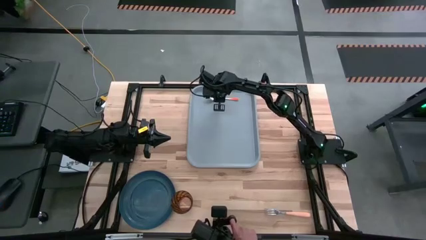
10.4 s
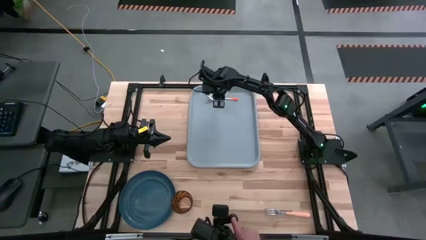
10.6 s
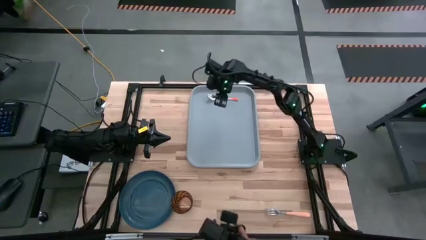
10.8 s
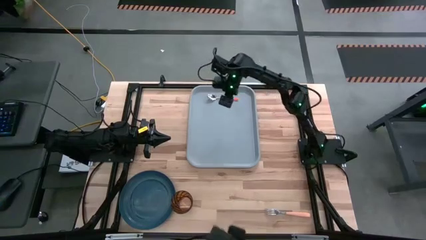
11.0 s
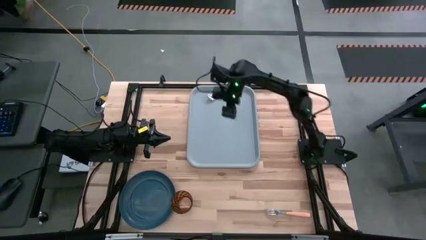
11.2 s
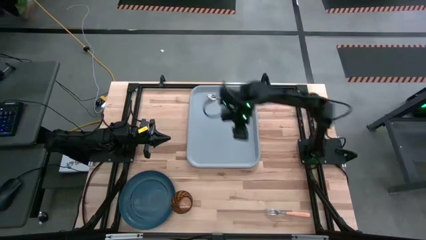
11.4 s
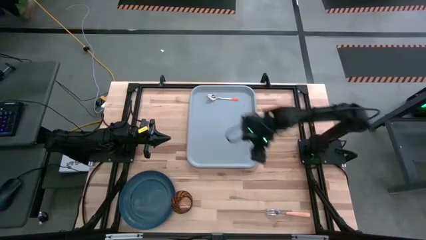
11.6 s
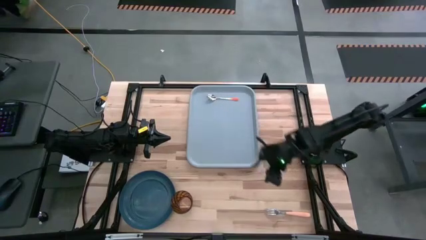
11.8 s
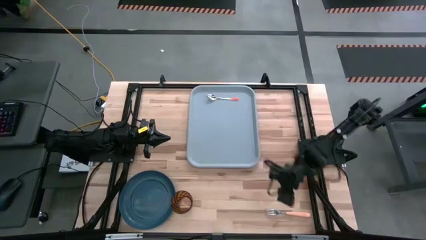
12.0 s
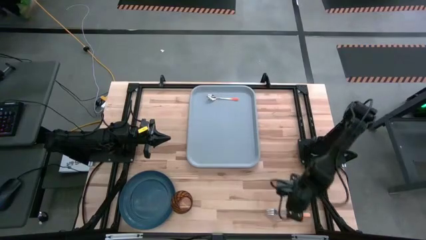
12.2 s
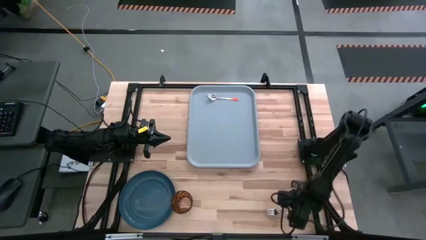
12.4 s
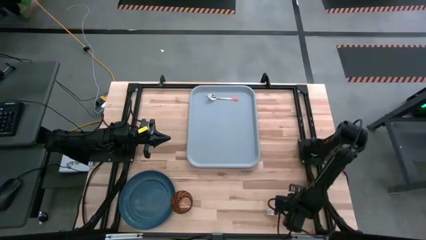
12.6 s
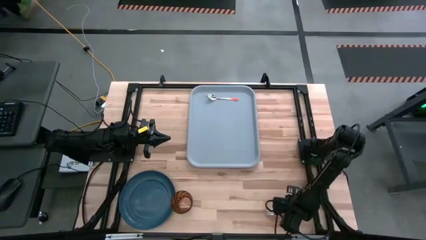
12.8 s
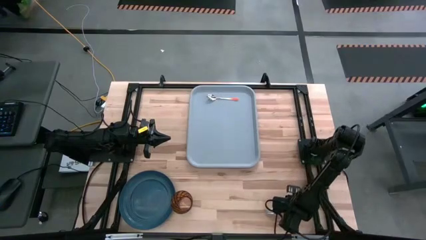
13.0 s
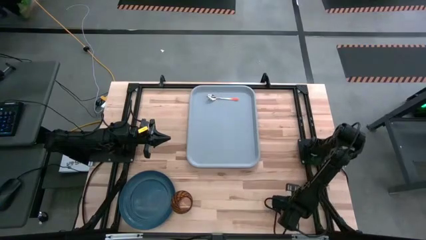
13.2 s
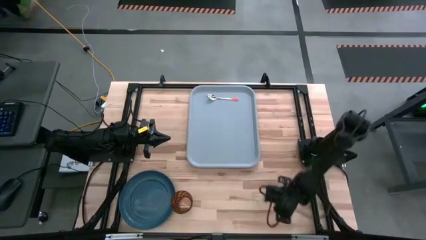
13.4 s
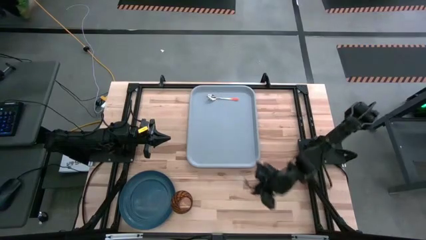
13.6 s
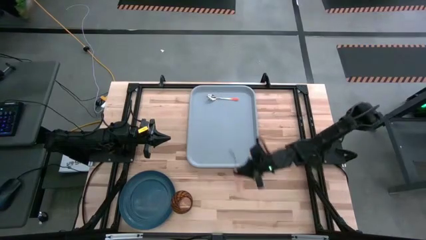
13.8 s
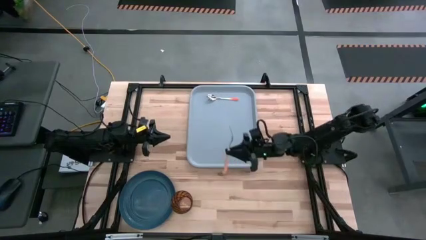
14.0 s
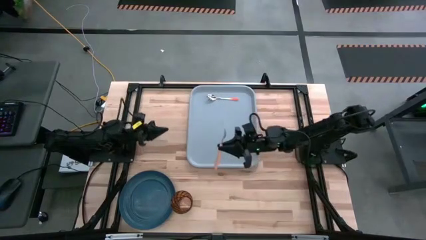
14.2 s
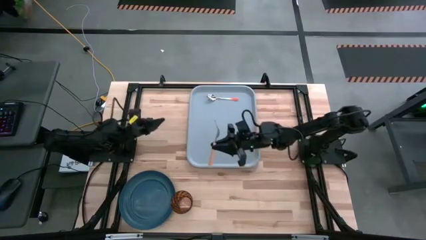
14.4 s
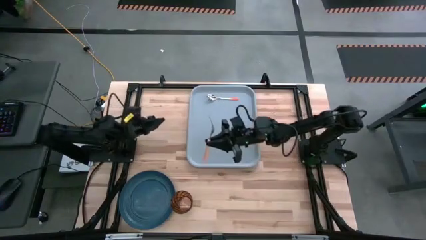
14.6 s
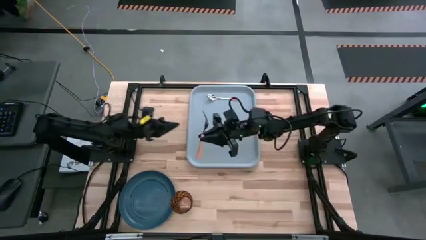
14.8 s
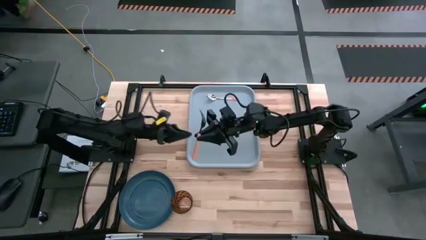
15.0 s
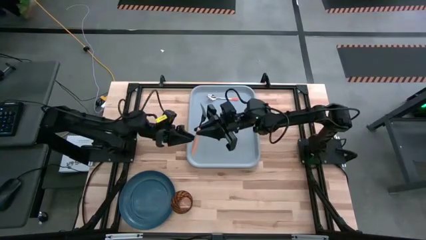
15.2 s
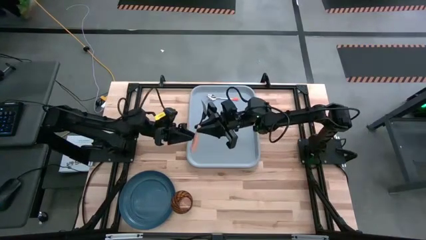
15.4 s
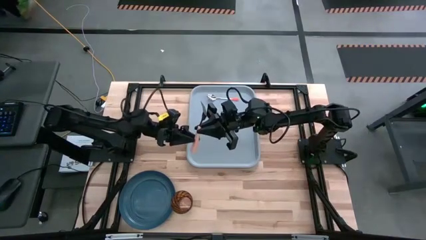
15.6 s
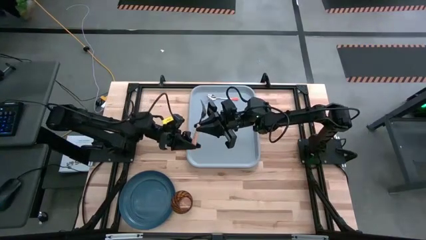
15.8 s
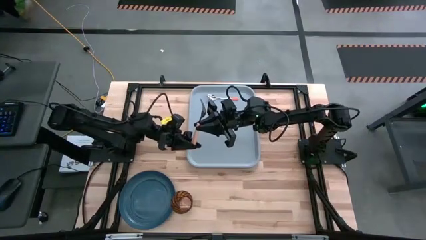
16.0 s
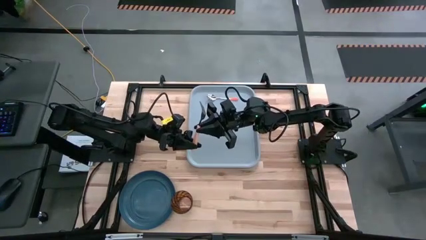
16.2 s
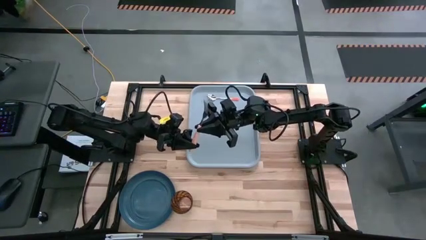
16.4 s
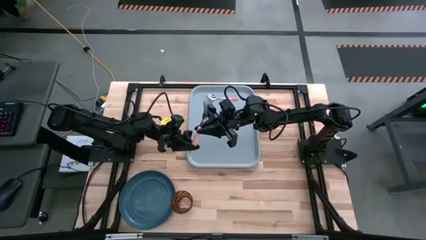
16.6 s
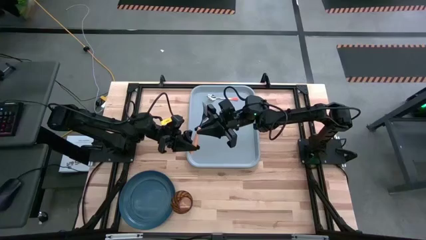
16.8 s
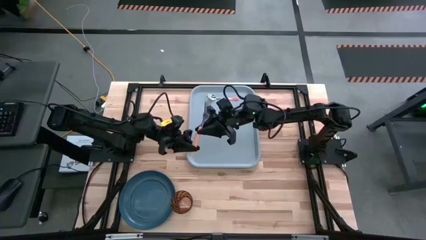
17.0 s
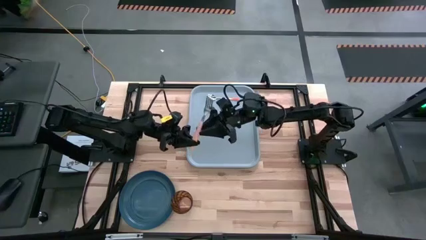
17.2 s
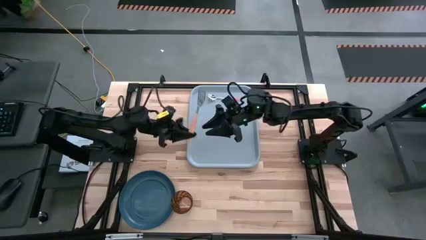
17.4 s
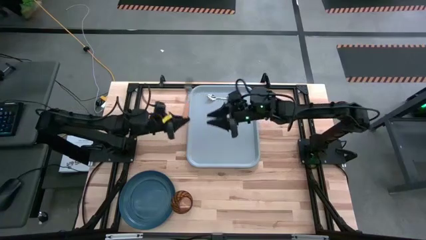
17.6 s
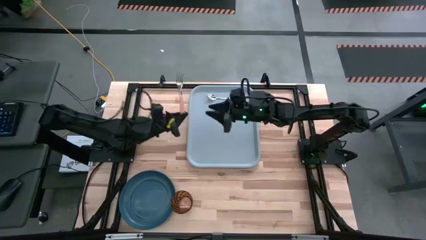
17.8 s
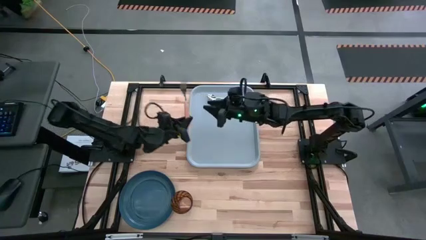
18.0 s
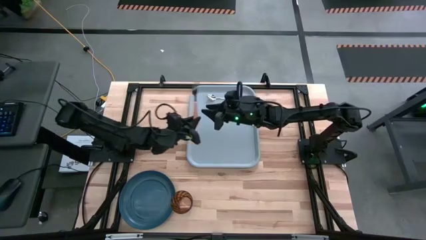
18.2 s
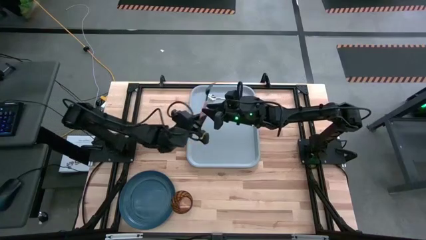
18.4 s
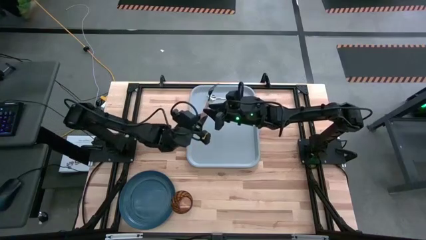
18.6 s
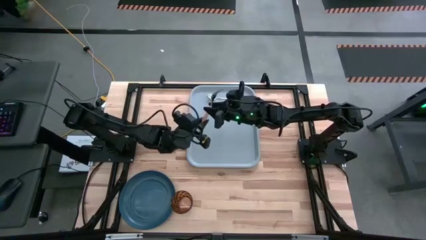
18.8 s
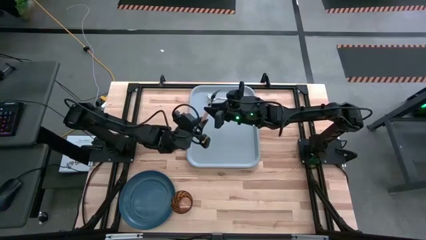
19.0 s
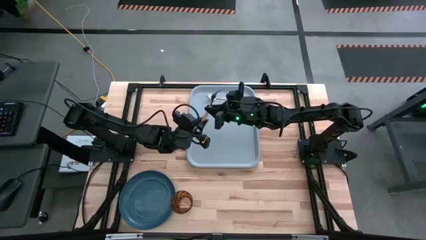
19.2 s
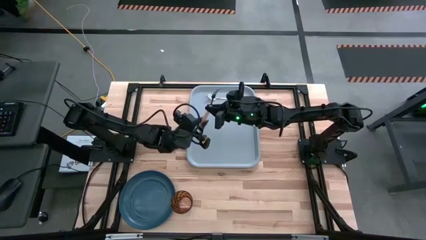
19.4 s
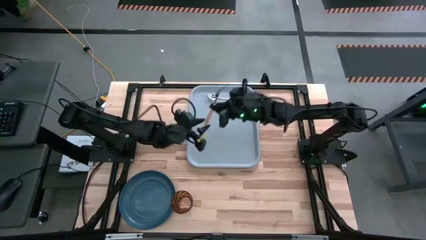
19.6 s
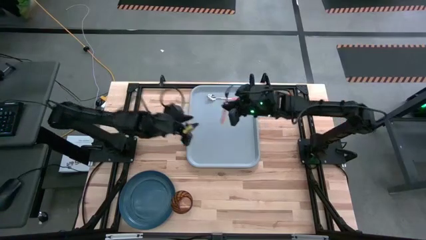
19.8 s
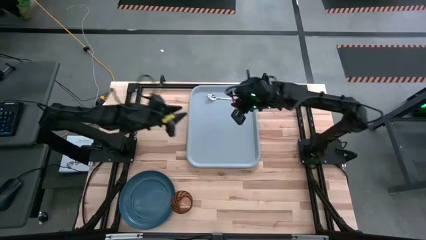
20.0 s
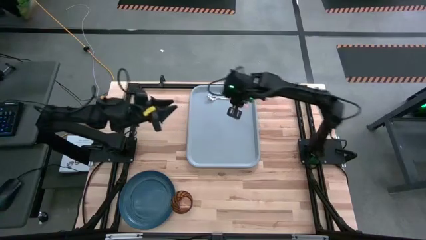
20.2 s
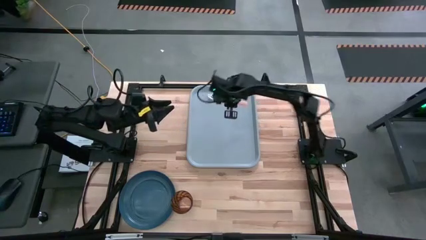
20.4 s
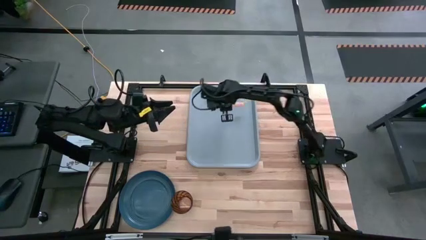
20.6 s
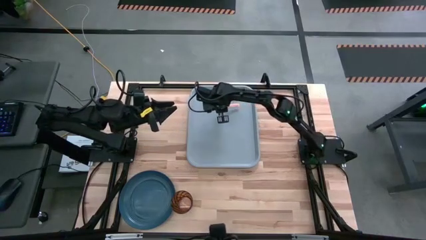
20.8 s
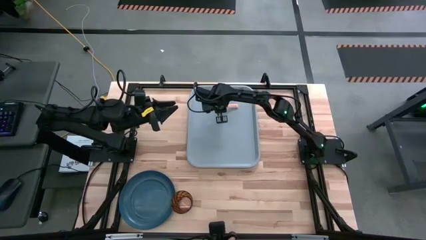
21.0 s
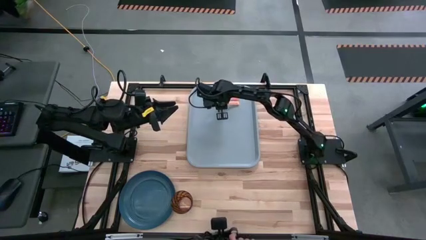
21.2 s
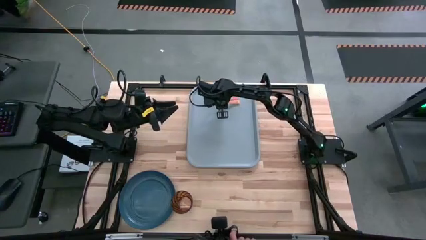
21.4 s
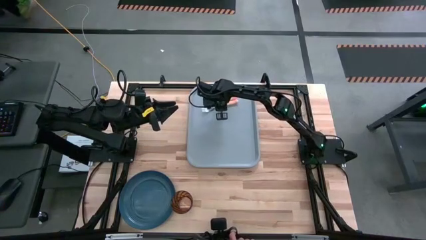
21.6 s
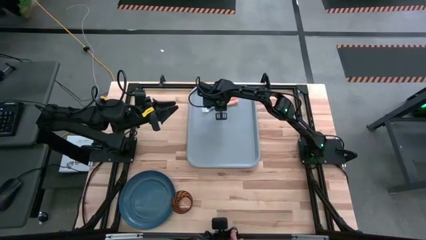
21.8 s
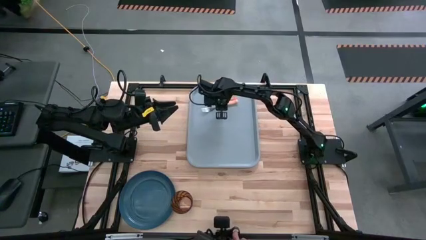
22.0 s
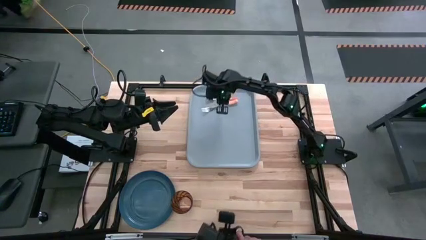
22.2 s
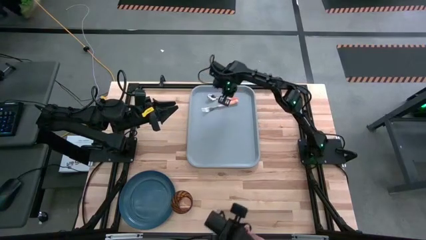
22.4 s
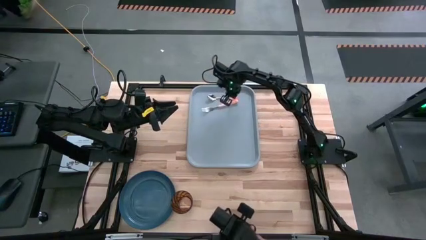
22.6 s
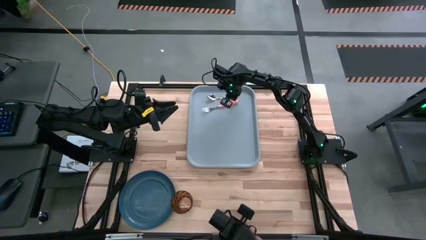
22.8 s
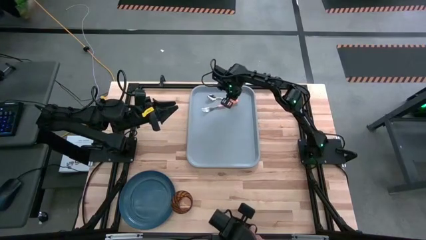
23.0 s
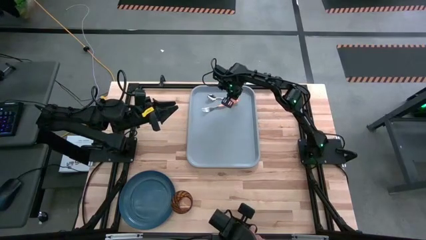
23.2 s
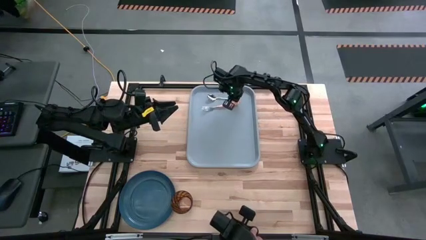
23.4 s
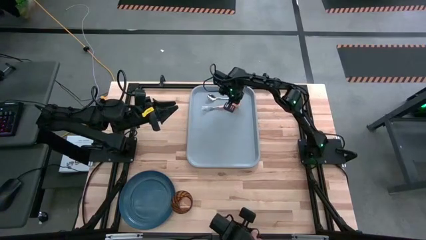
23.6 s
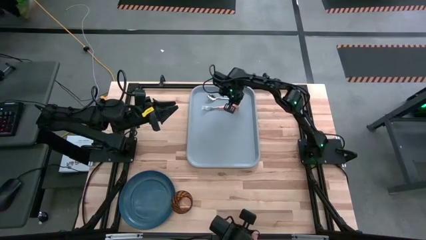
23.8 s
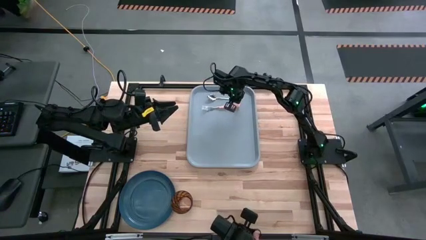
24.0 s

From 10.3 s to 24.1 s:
Task: Pick and place plate/cup/fork/spoon on tray
Put the orange fork to the left of the orange spoon on the blue serving tray

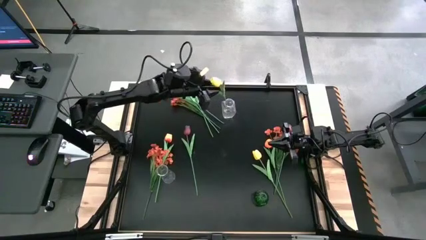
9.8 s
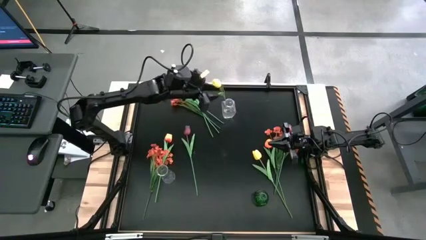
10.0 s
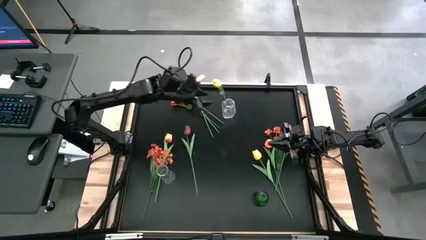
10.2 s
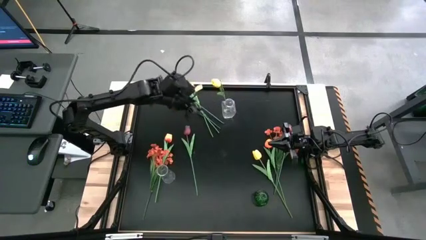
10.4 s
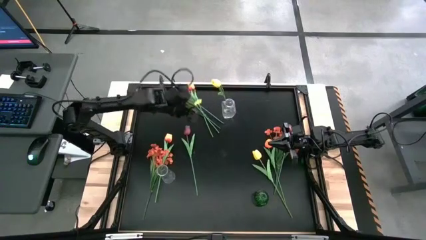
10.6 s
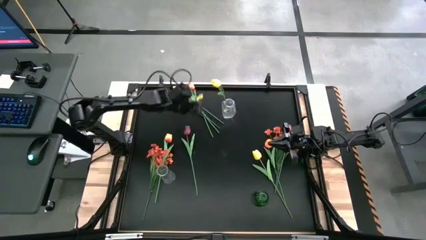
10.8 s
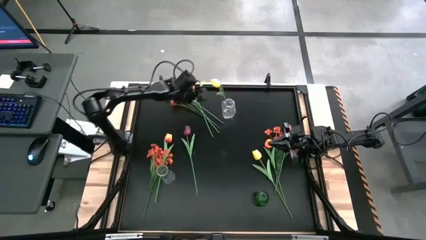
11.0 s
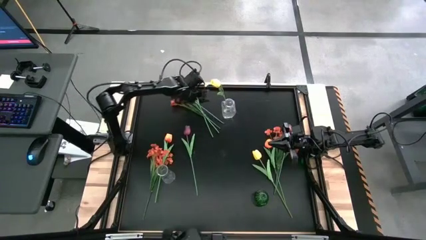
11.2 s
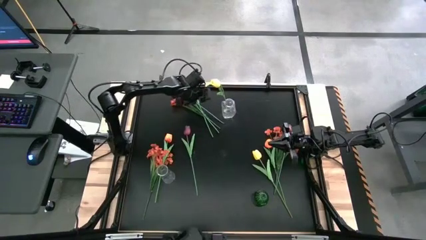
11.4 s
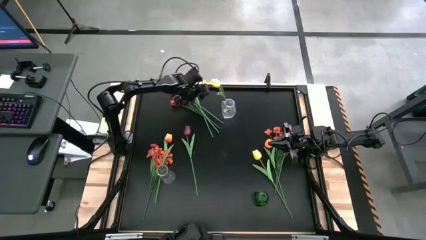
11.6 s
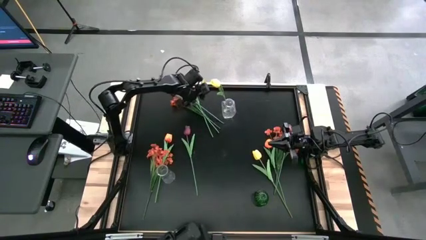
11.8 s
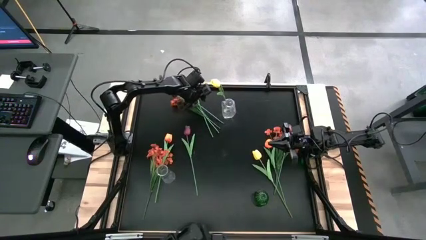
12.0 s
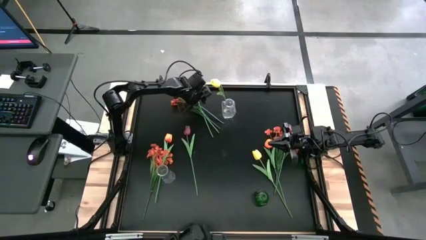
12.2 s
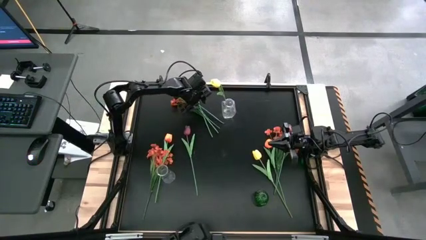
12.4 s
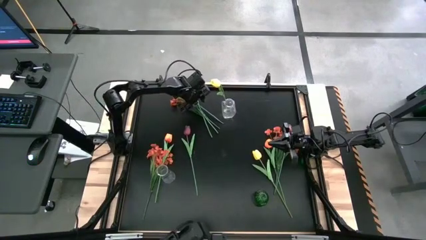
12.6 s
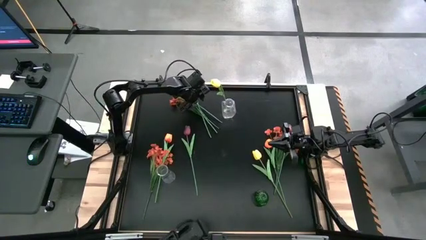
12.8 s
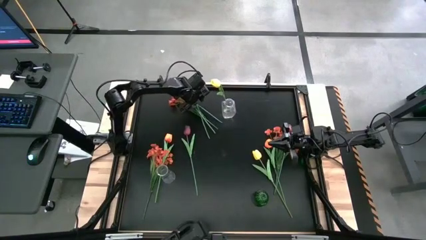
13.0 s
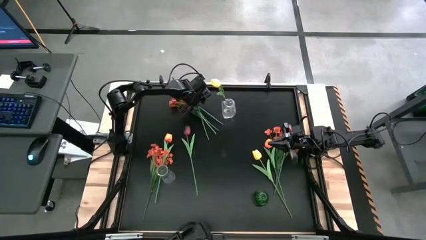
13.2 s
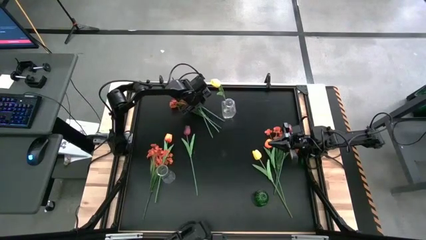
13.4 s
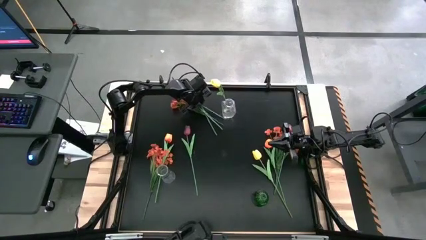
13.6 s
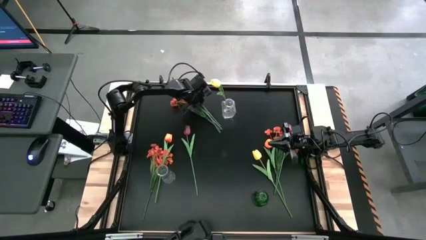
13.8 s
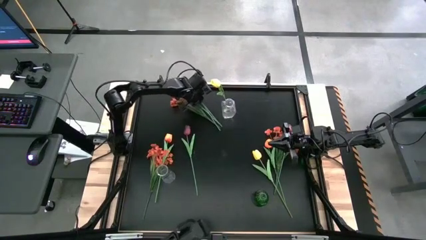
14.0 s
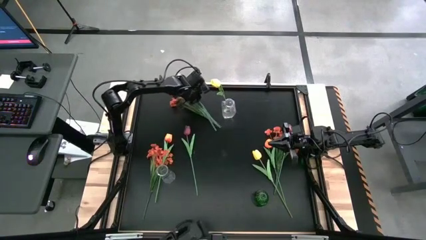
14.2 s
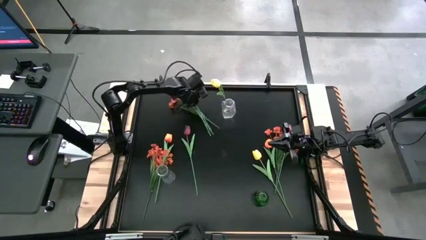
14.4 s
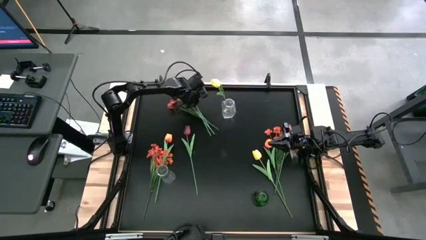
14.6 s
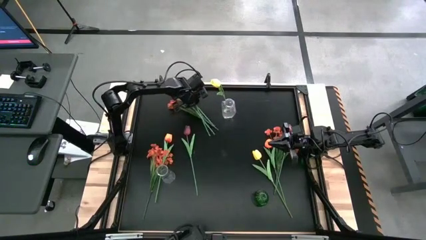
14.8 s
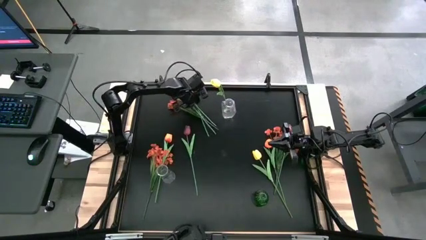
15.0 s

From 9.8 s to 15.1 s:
Task: Sort flowers into vase by color
Put the top yellow tulip into the top transparent vase
